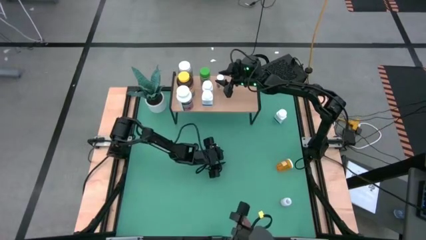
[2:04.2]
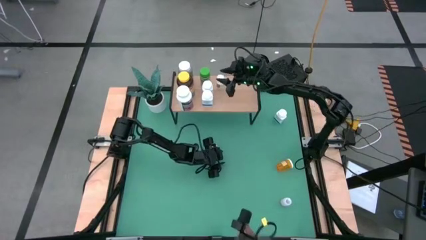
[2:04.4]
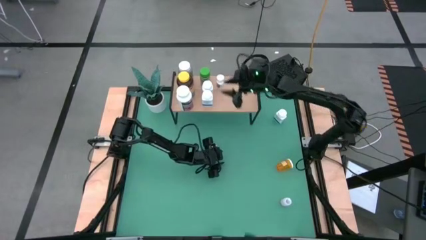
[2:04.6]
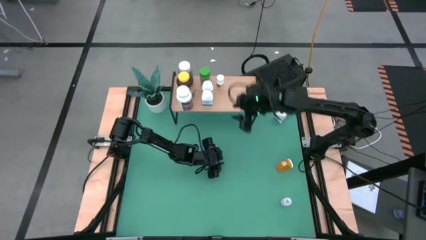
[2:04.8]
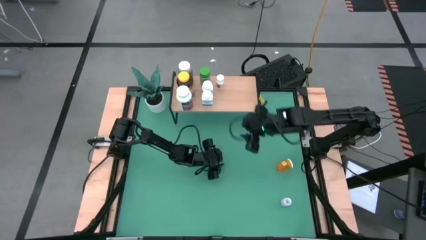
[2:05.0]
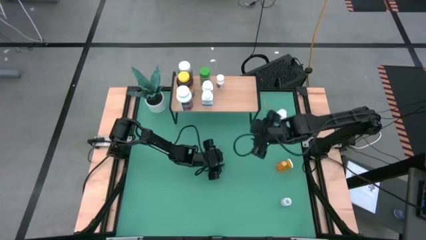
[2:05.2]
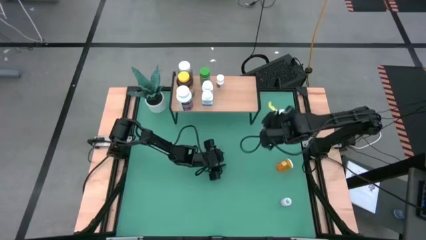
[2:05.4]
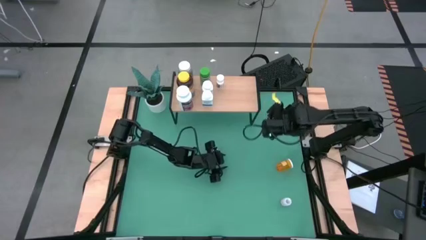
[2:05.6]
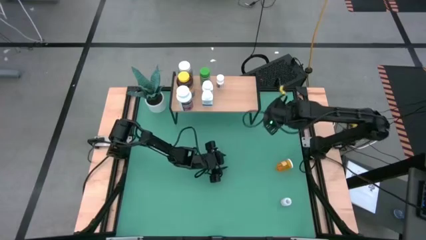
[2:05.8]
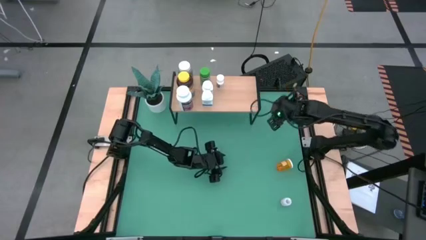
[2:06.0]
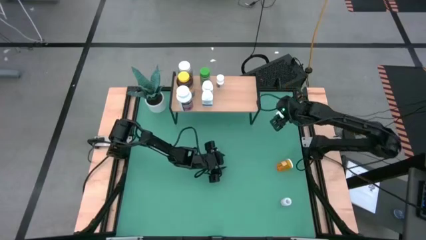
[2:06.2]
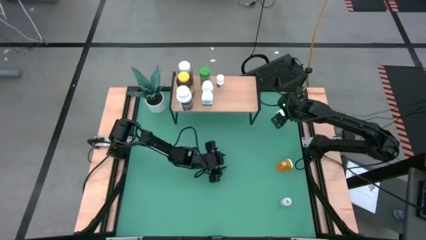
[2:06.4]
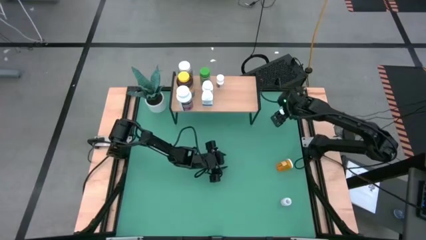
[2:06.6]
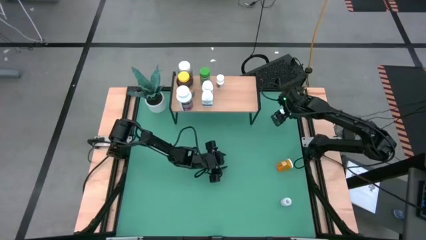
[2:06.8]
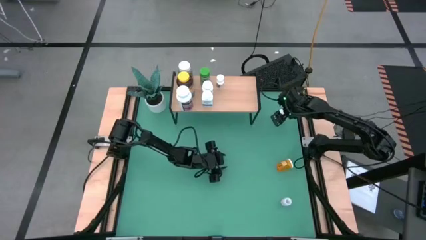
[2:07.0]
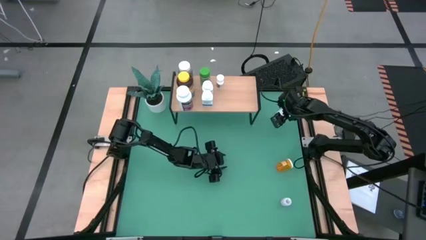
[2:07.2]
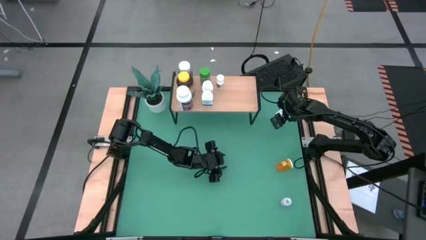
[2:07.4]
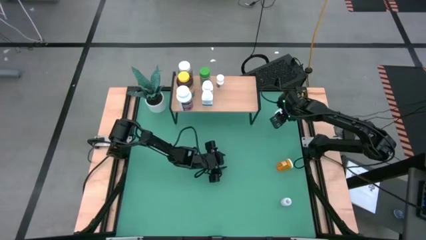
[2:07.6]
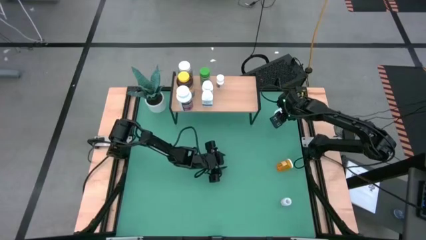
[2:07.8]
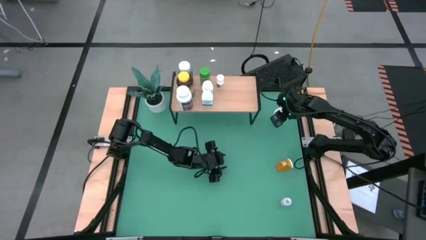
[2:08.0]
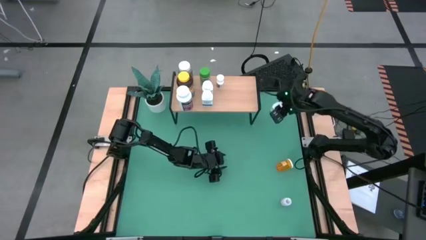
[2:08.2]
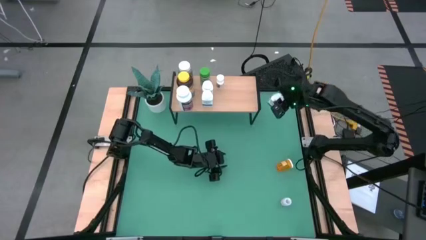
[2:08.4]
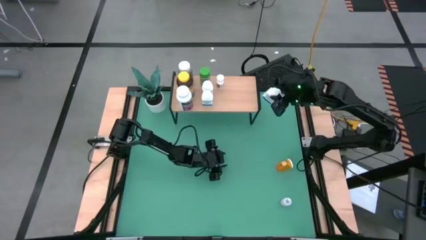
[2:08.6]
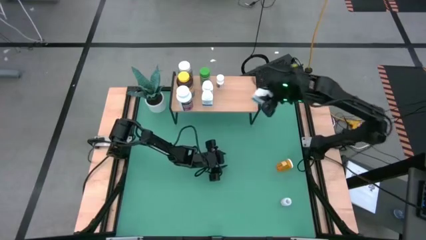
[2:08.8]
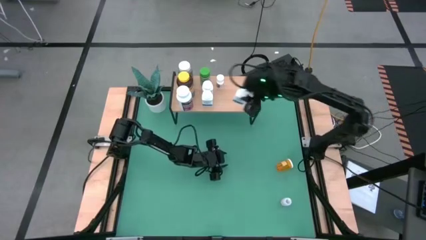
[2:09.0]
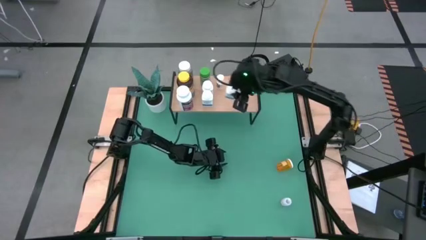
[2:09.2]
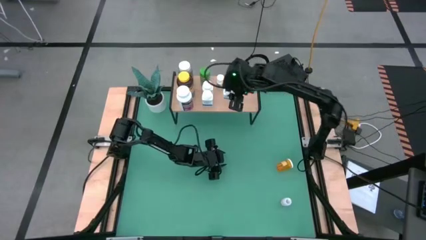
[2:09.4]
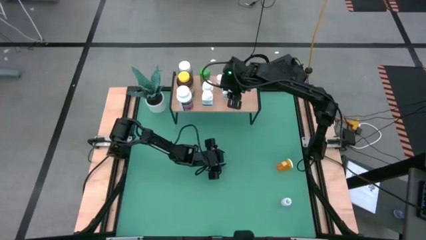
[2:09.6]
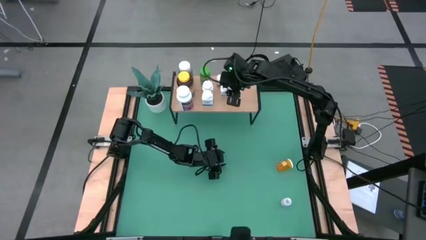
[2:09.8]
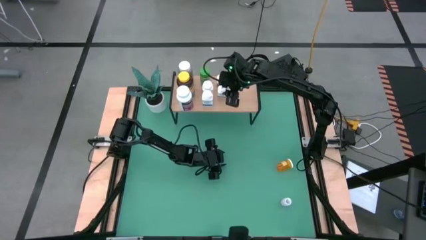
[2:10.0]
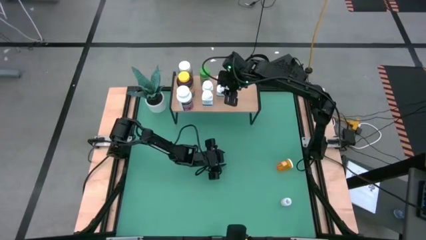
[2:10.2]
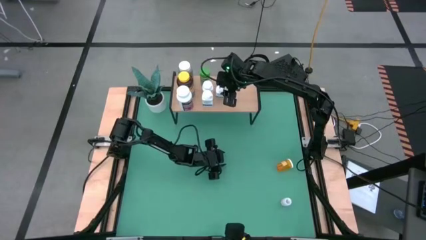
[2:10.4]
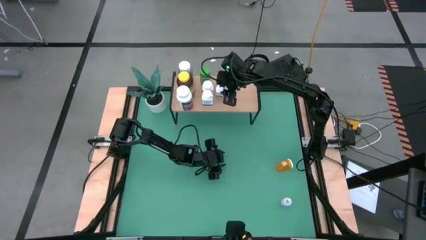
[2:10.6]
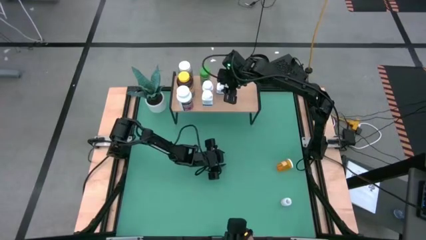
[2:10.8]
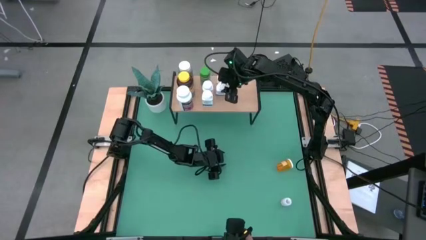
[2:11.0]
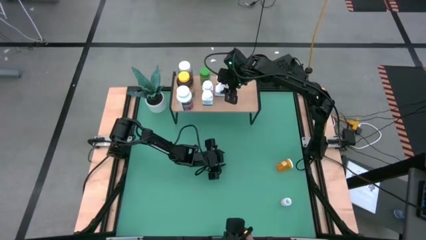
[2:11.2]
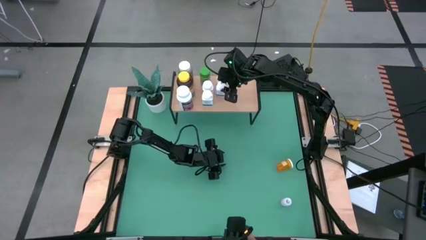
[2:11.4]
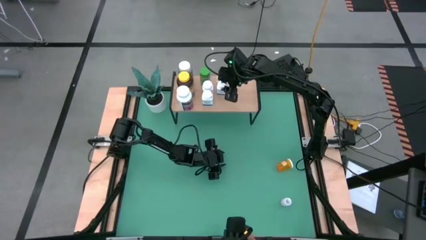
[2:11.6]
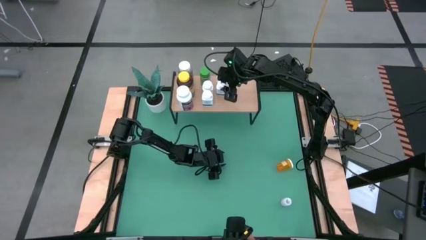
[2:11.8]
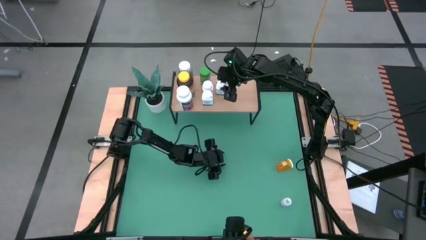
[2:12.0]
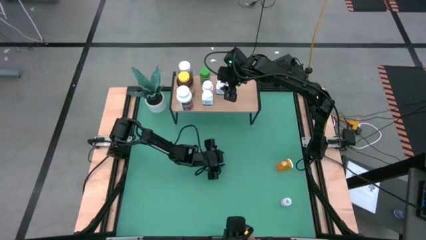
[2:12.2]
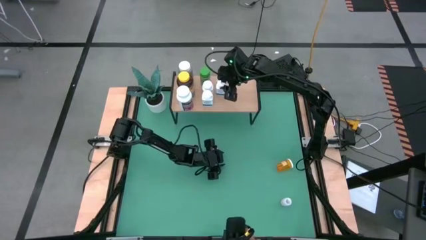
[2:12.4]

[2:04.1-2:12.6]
Task: Pick and place medicine bottles onto shelf by color
Put the blue white pill bottle on the shelf
